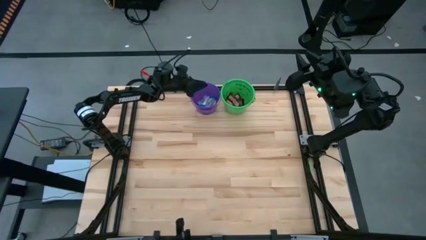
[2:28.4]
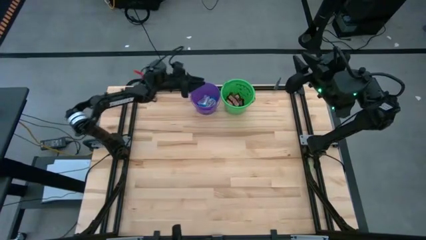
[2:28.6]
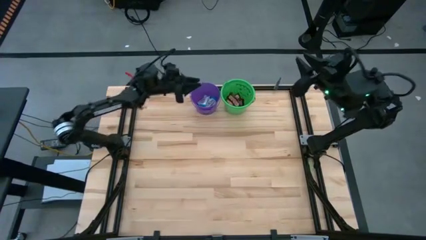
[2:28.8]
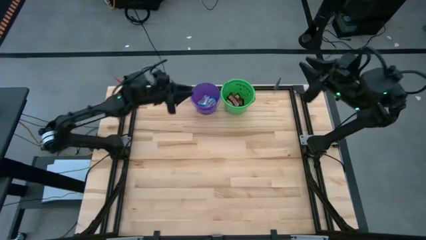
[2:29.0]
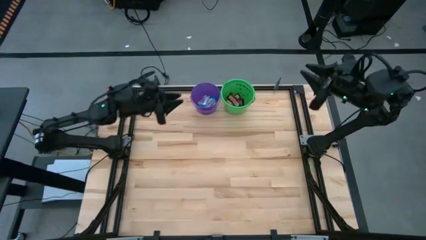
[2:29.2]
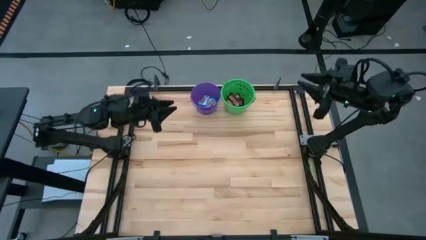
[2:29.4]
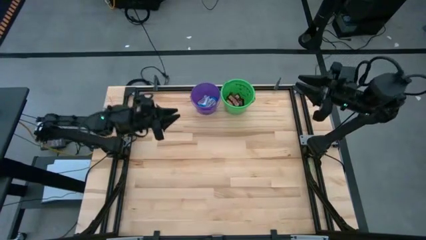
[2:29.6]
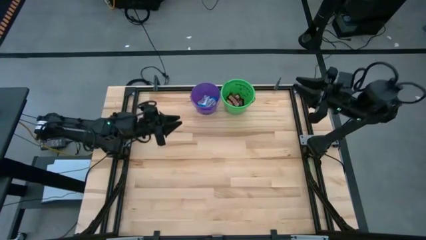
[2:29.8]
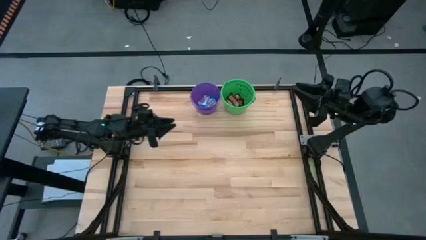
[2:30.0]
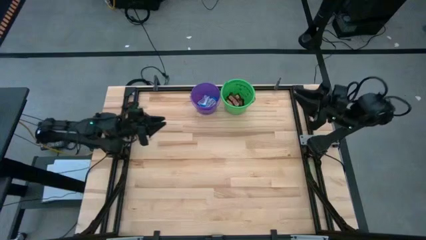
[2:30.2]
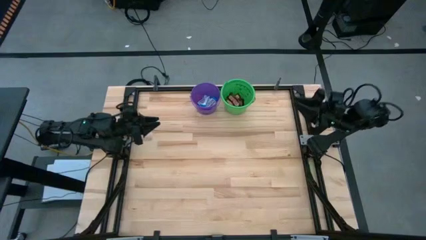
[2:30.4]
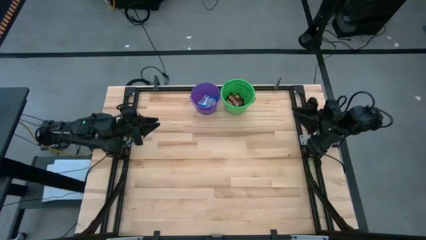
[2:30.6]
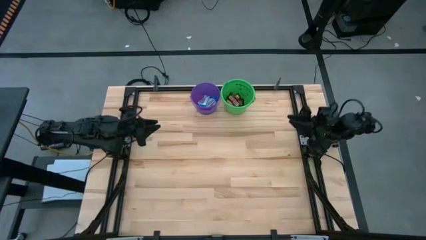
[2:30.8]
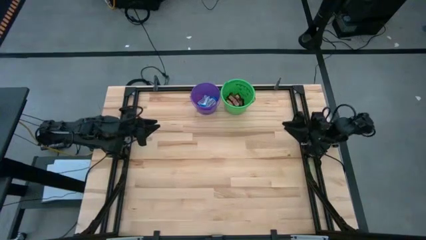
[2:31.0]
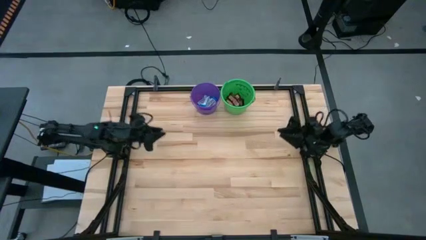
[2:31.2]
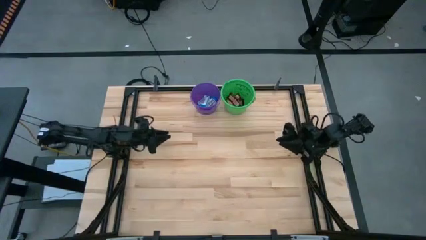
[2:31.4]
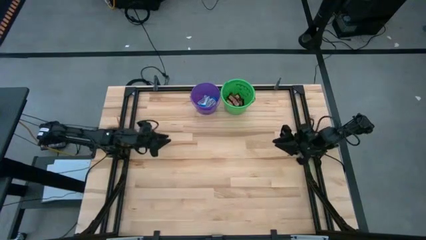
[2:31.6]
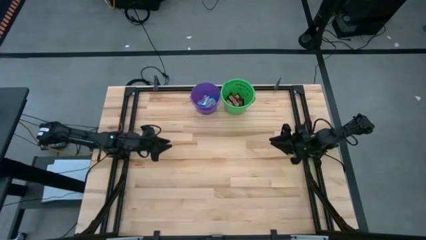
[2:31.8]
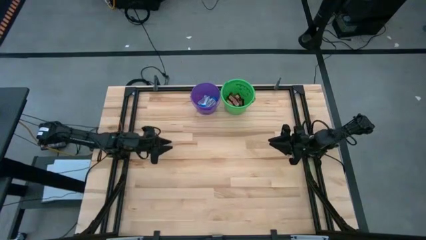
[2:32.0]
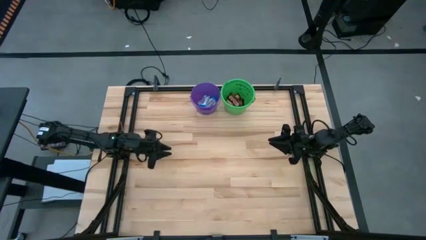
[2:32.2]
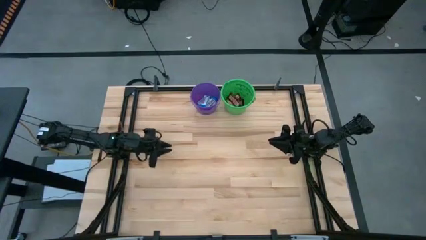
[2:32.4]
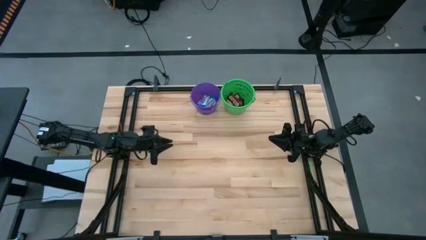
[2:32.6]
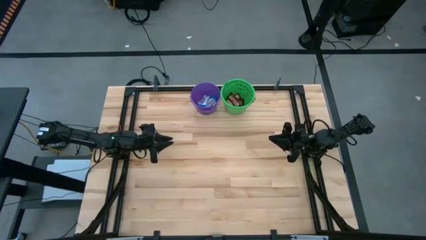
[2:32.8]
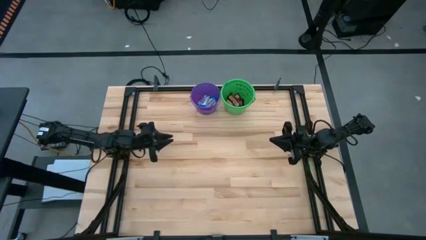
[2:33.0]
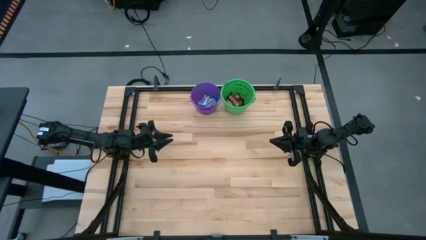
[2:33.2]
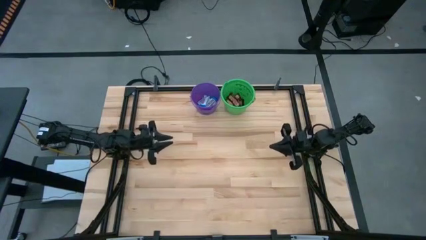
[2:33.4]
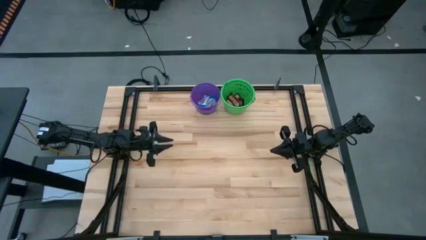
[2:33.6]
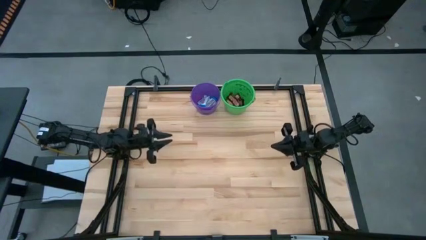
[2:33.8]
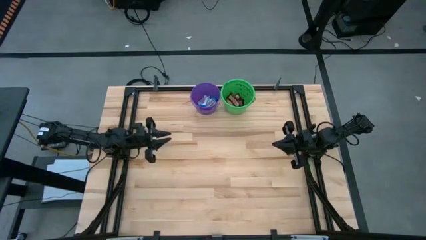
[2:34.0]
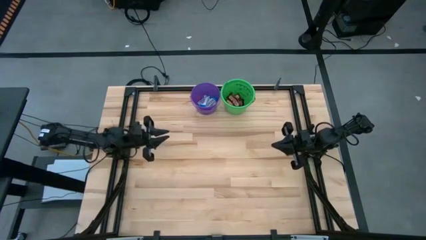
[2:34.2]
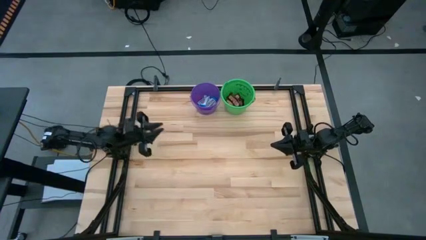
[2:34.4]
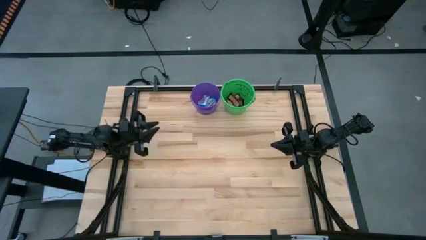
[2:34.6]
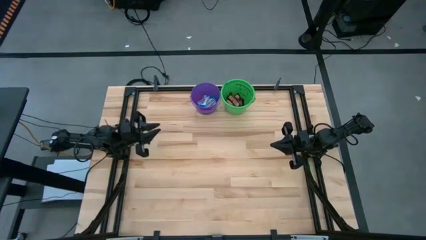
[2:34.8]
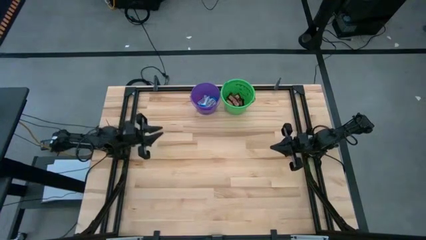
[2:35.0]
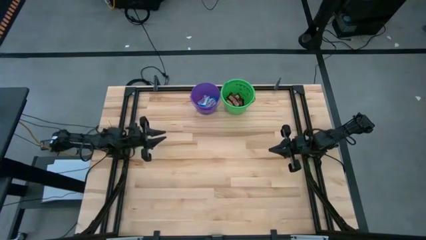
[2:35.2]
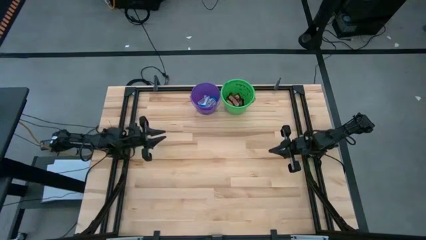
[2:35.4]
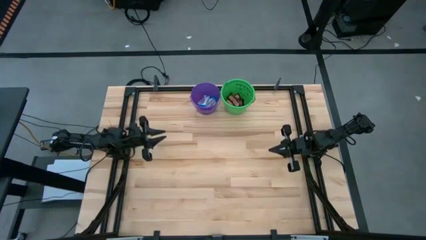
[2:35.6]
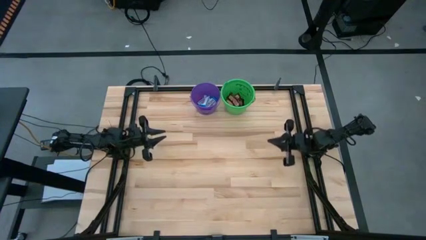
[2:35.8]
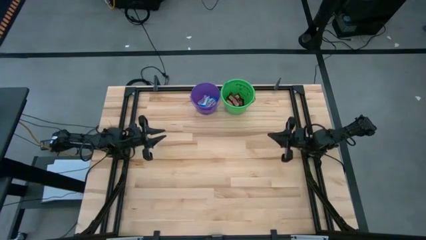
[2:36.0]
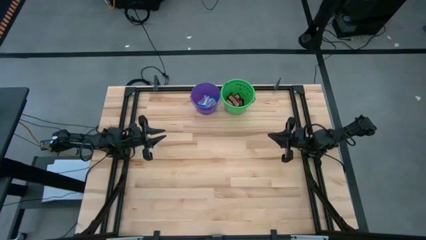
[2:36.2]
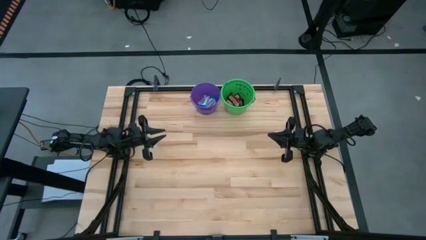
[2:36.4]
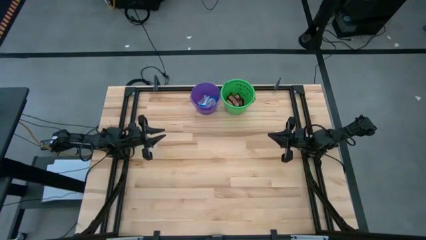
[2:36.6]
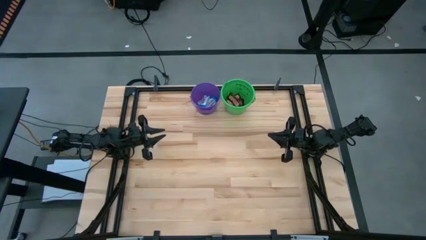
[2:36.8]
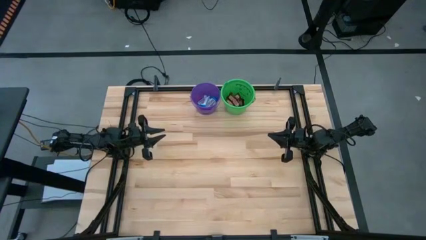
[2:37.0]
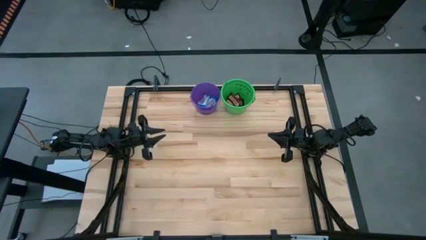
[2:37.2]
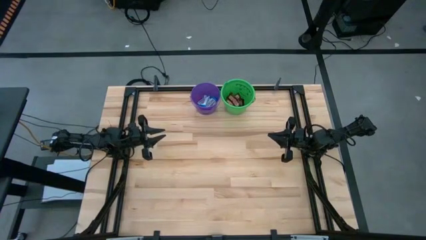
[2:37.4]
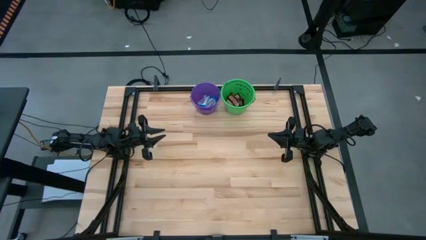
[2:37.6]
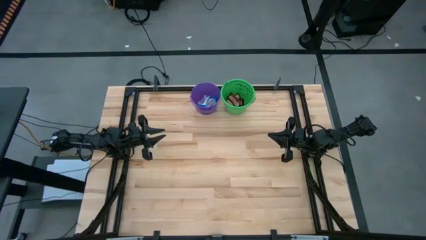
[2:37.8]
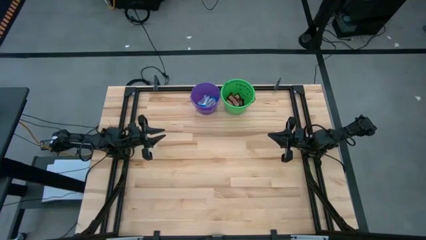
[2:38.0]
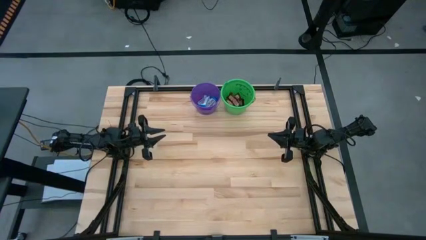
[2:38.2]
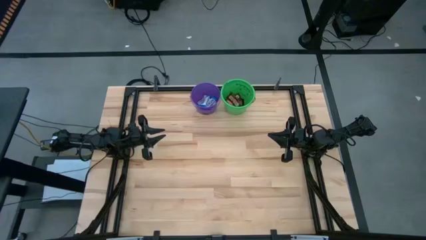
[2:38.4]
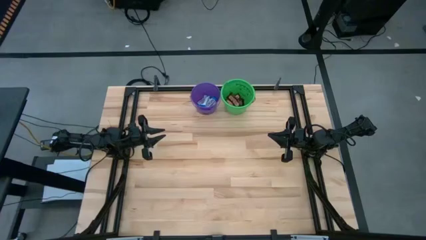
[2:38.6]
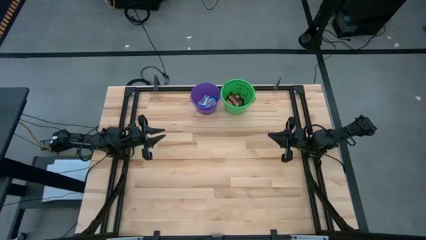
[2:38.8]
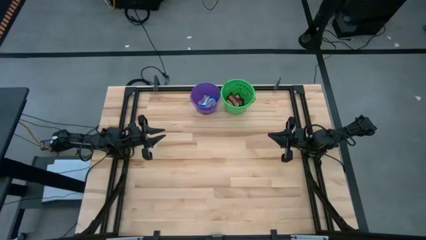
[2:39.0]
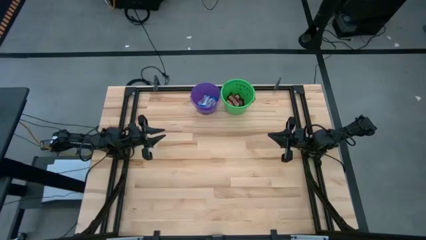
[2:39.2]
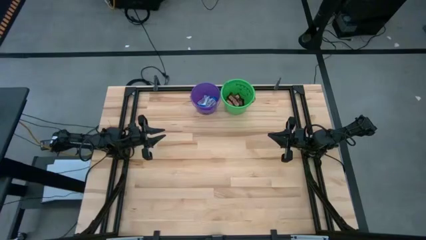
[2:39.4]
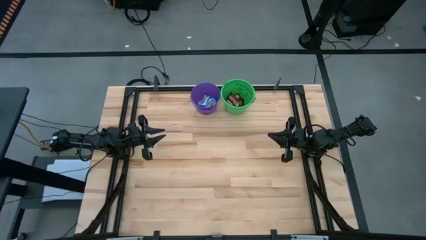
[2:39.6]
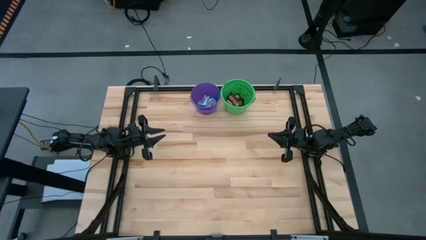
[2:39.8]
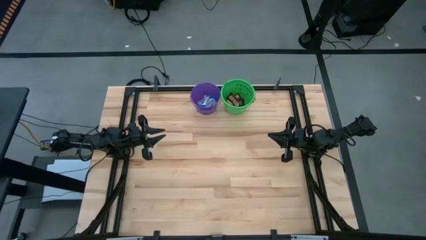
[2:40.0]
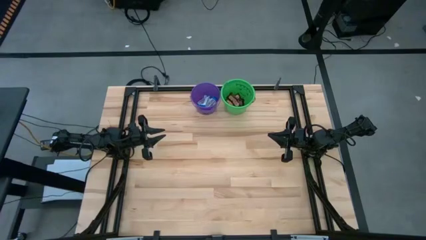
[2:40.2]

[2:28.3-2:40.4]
Task: Sort candy by brand, put in halloween buckets
Return to Home Position
